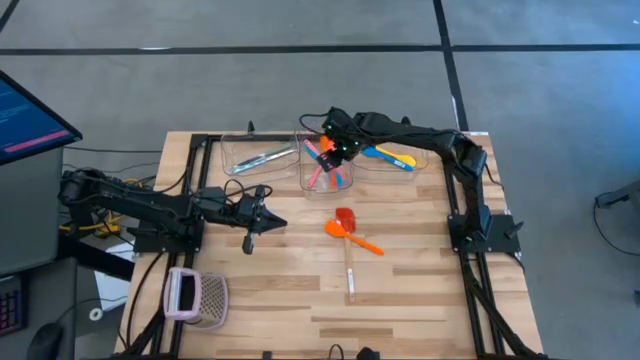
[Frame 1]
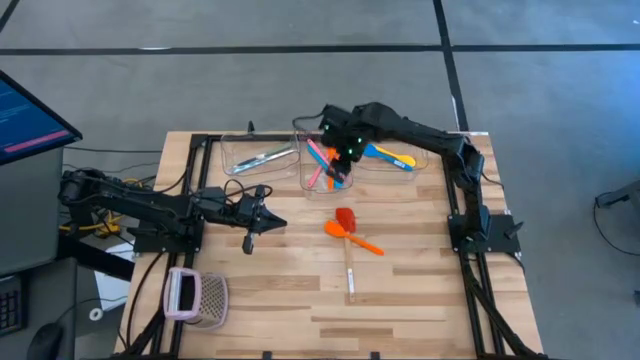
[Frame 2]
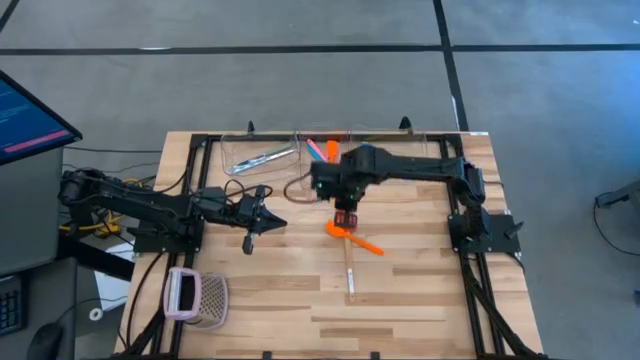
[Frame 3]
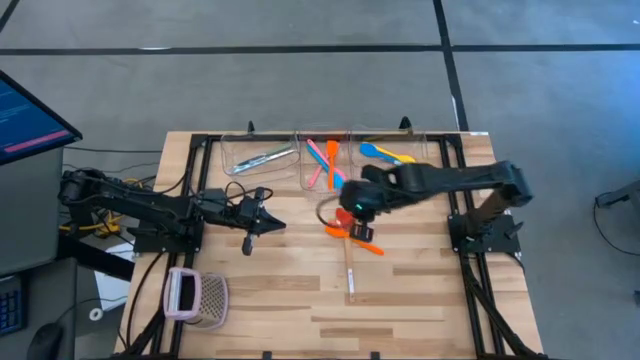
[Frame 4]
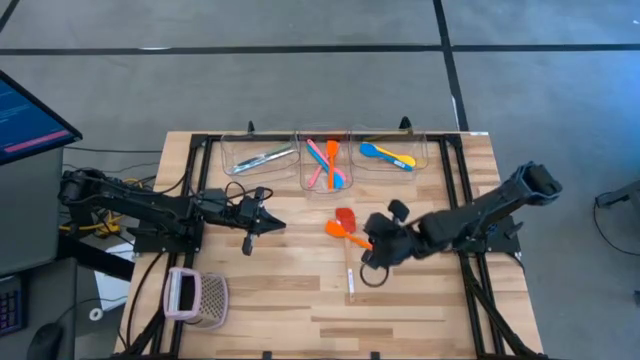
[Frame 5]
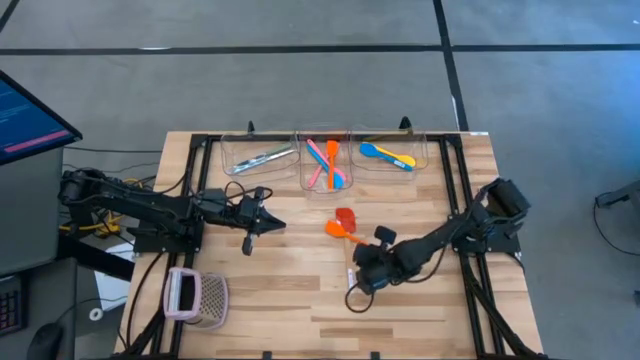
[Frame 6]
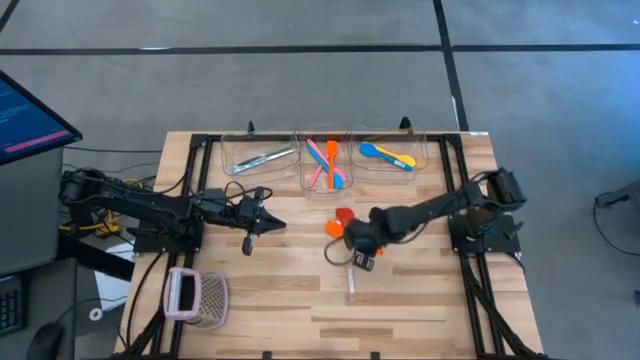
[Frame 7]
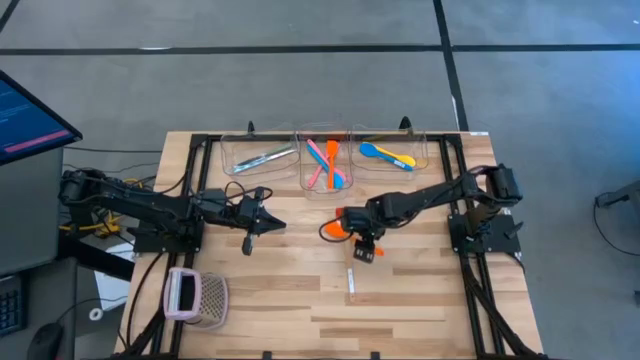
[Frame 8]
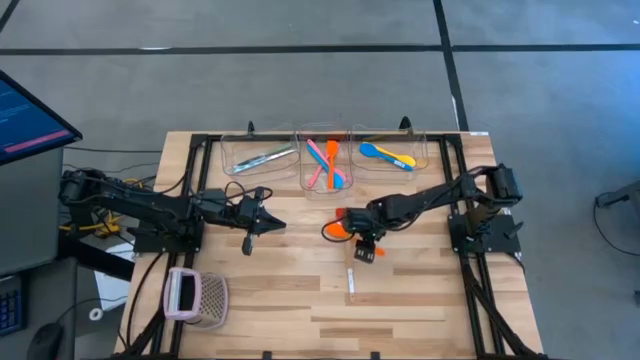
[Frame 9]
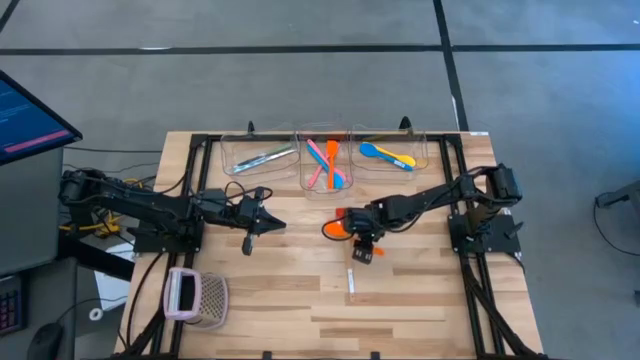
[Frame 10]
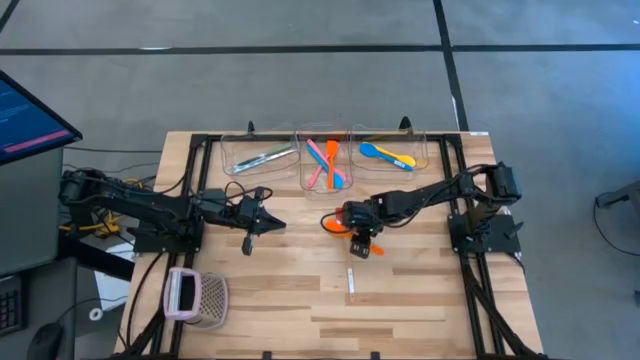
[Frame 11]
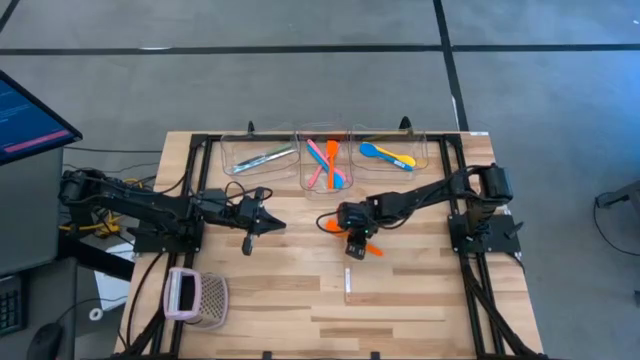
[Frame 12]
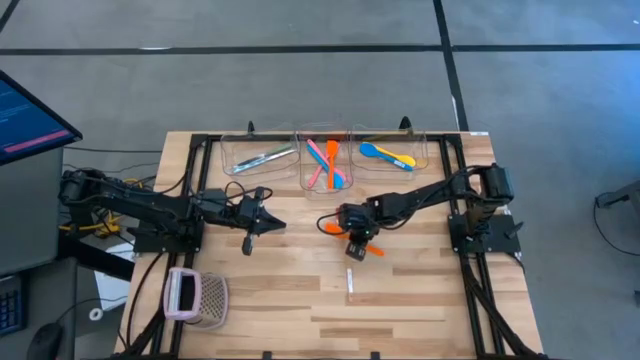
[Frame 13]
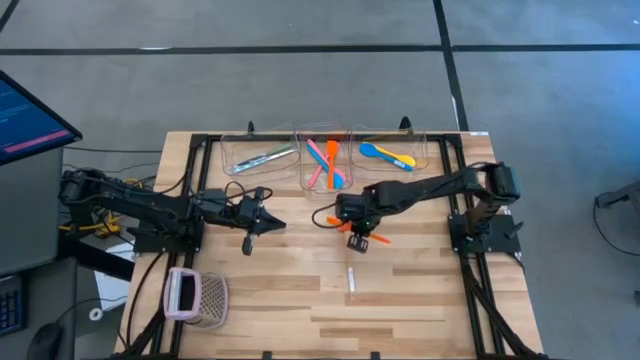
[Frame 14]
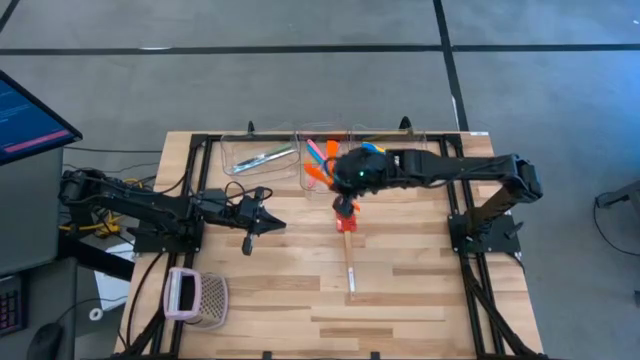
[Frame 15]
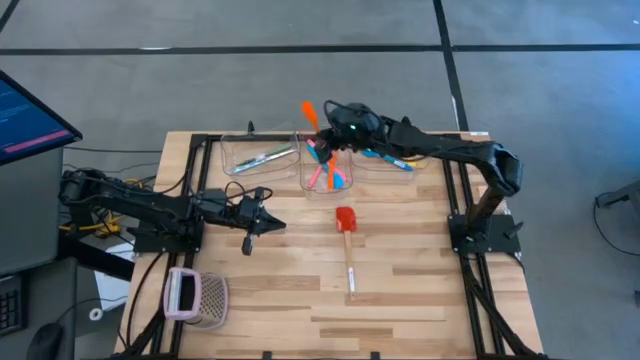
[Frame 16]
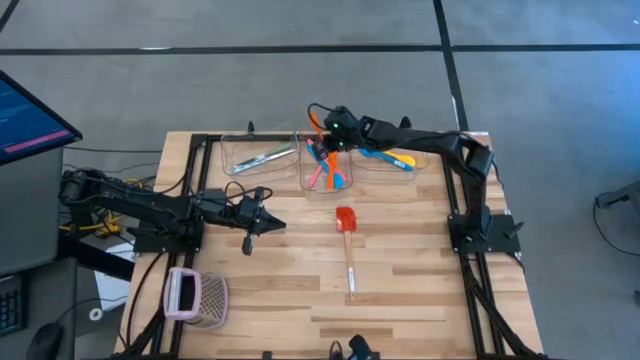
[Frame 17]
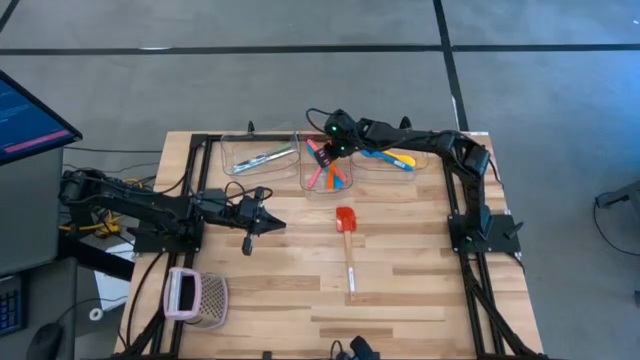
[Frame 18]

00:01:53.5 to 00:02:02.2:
Task: Pick & Place Kitchen Items
Put the orange spatula into the middle transparent bin

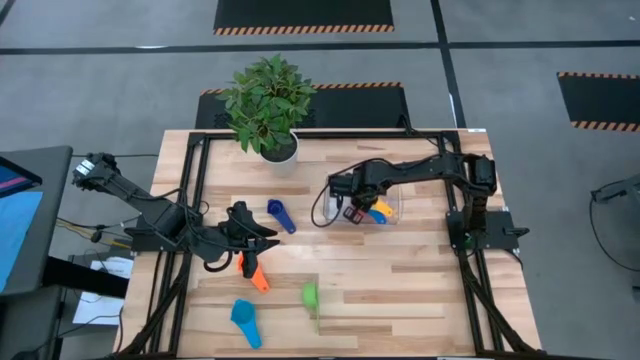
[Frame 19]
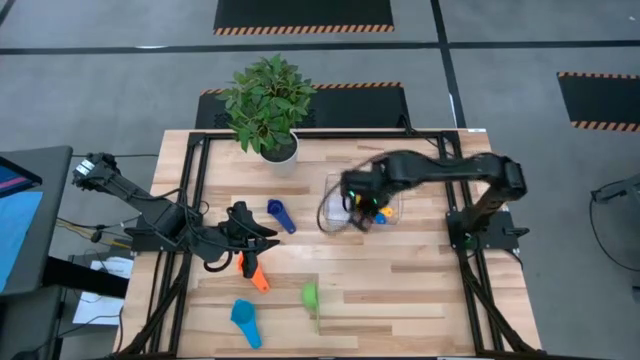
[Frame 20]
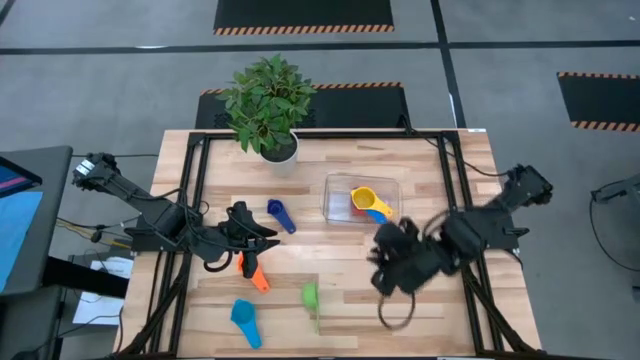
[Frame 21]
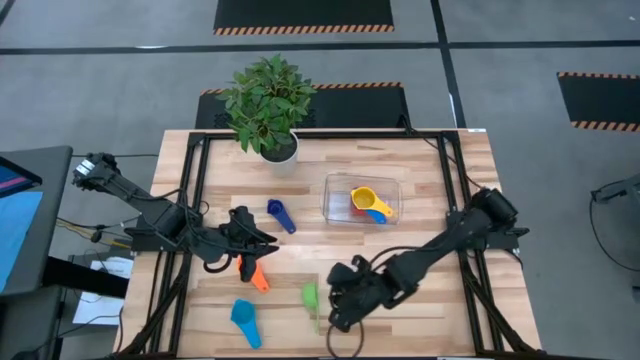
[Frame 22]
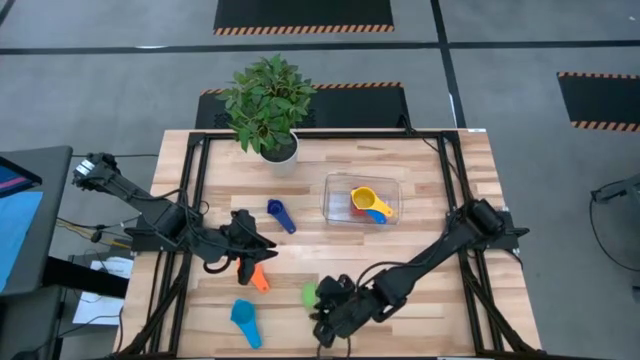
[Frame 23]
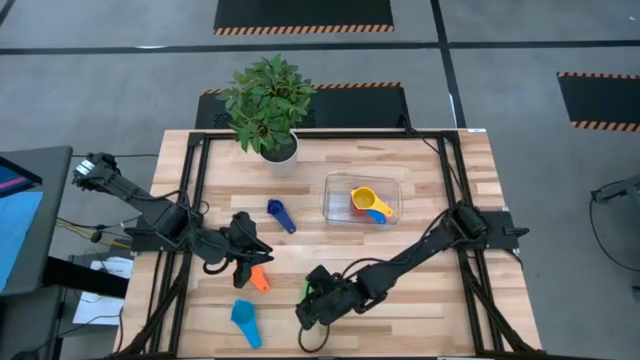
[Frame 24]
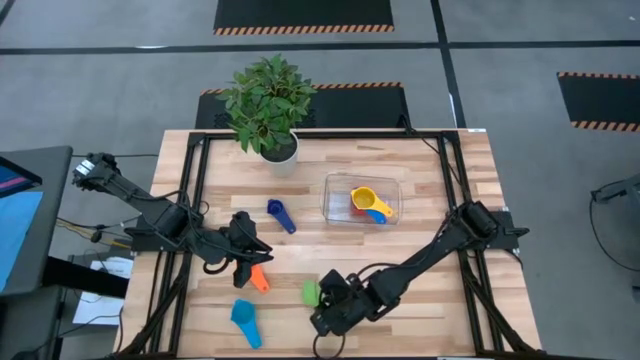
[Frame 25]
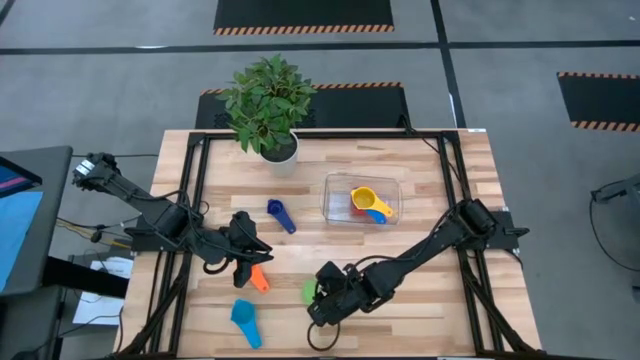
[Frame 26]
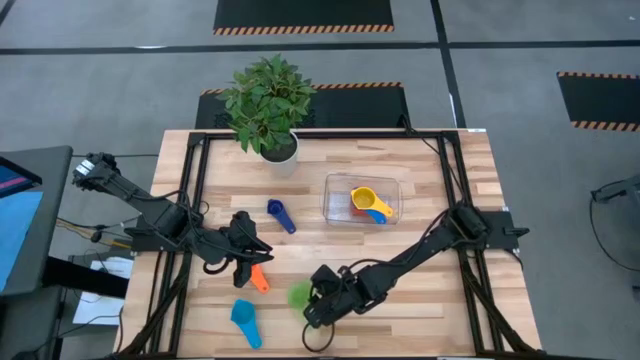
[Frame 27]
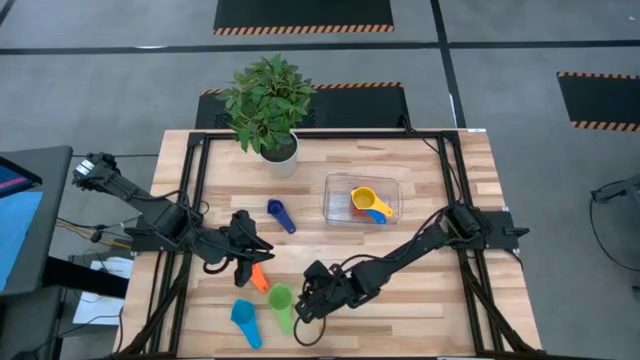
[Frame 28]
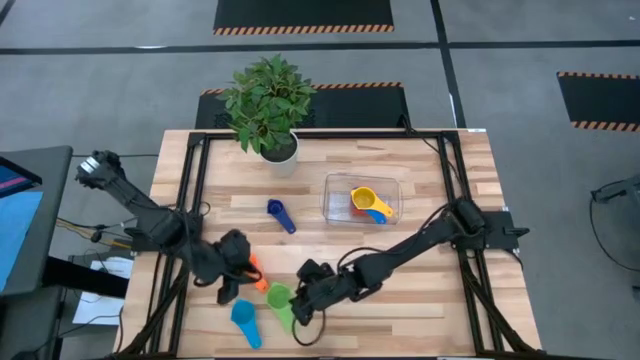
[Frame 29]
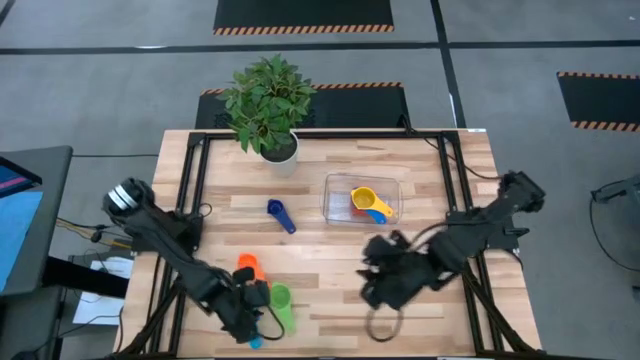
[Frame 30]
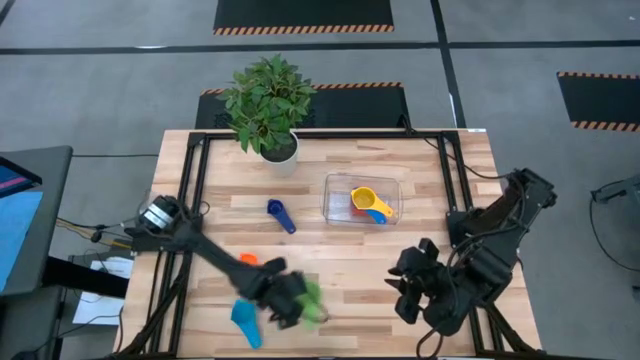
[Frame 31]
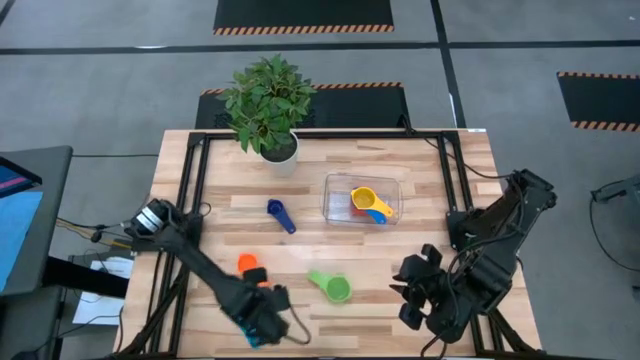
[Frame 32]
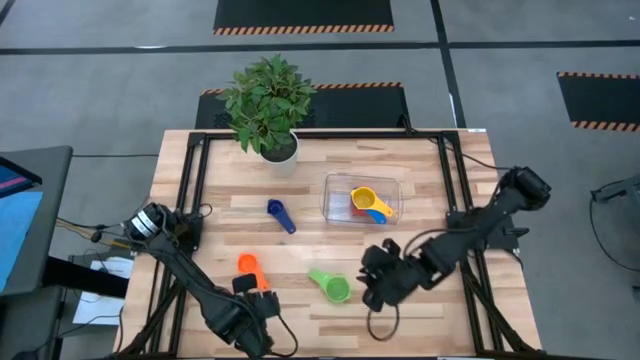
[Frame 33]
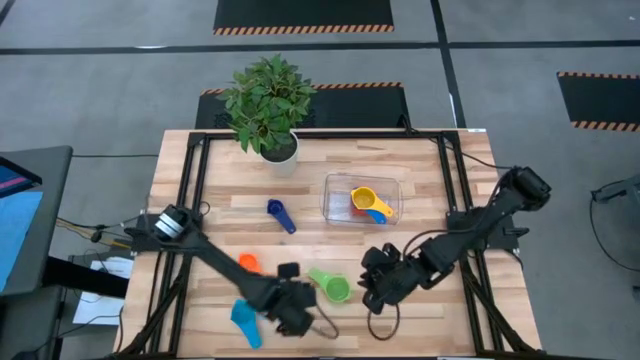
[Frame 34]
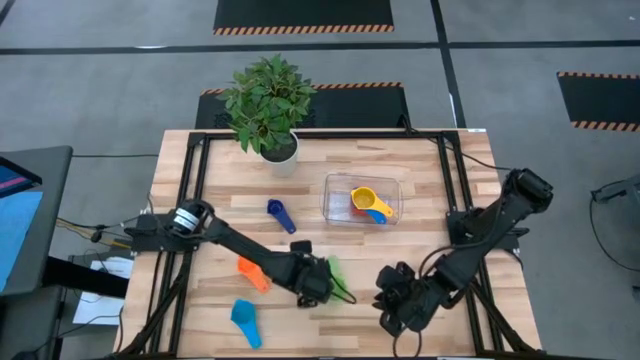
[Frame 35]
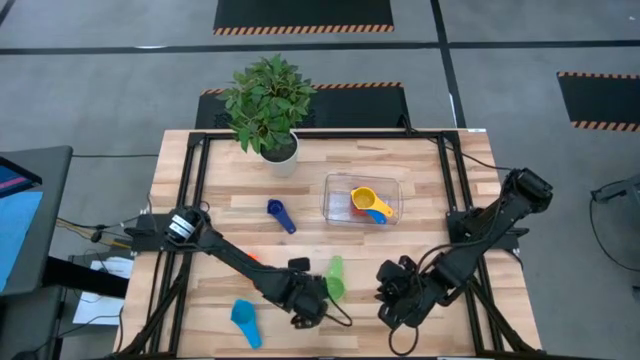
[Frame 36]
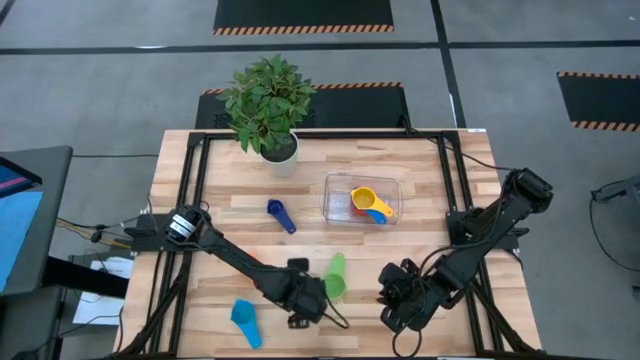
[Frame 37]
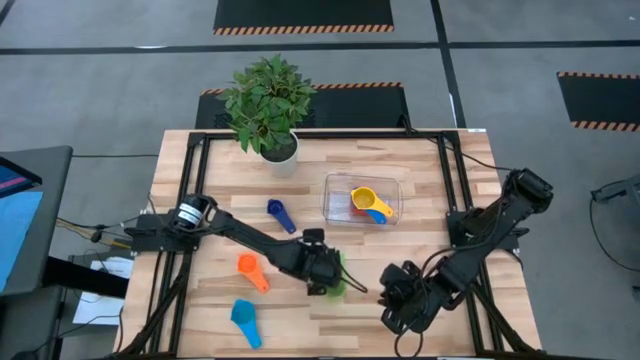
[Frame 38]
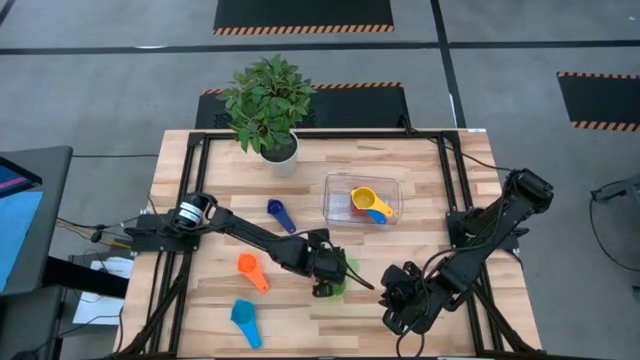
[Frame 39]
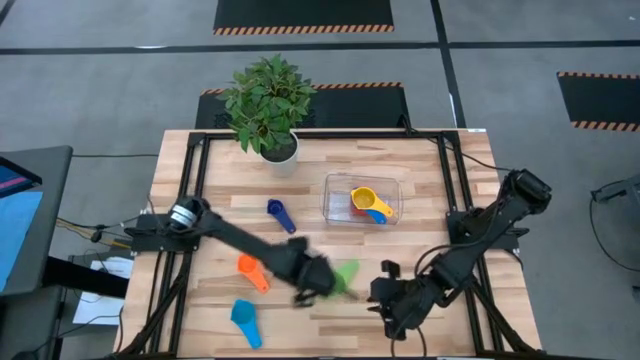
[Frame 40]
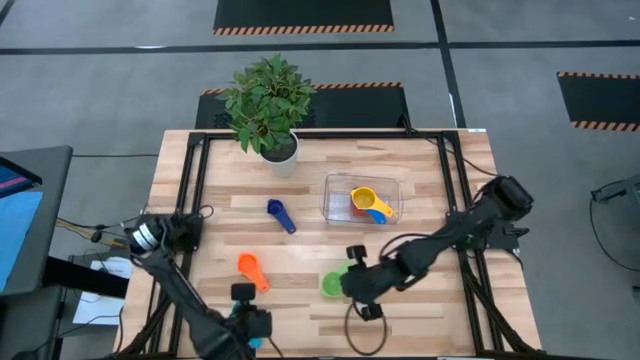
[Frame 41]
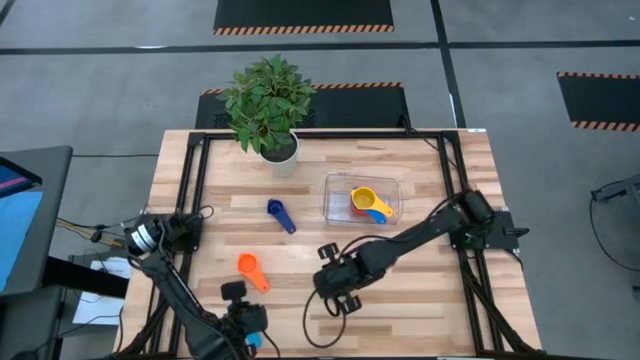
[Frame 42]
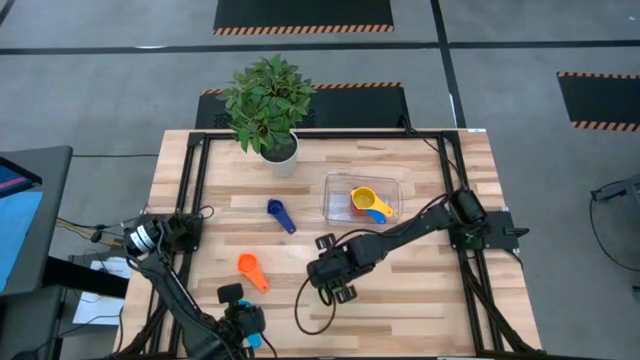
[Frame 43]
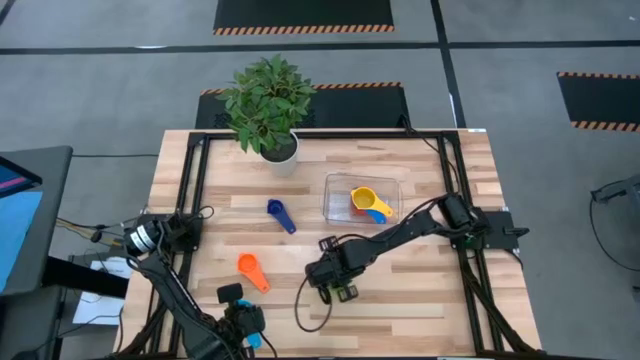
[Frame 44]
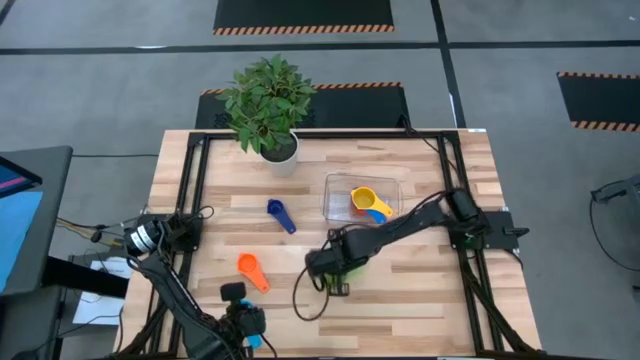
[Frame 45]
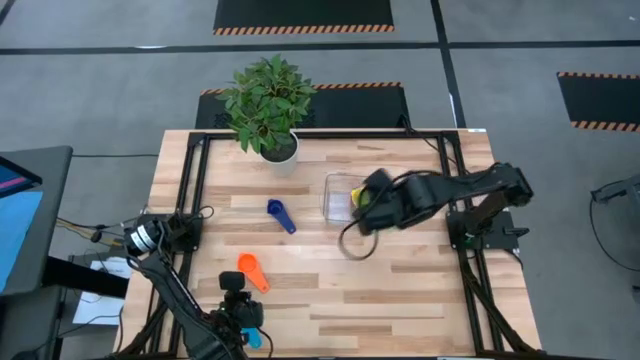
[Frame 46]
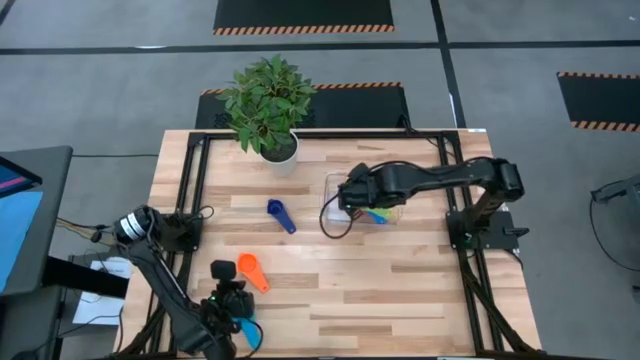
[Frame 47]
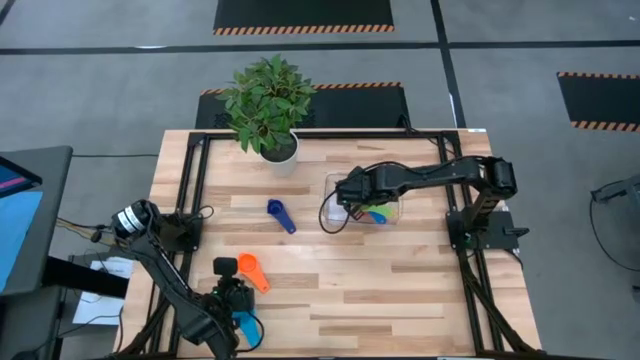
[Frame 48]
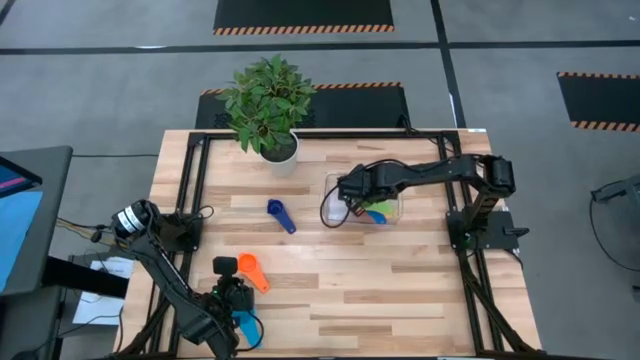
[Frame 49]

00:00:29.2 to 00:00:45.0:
Task: Nest measuring cups in basket
Stack the green measuring cup on top of the yellow measuring cup in the transparent bin
